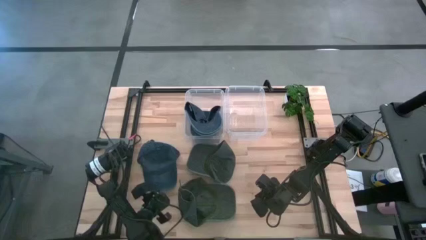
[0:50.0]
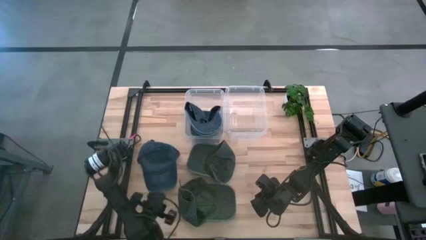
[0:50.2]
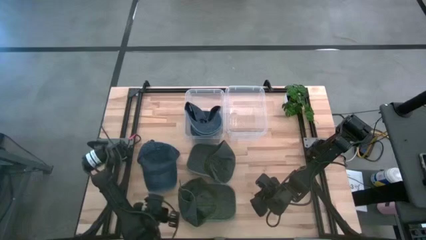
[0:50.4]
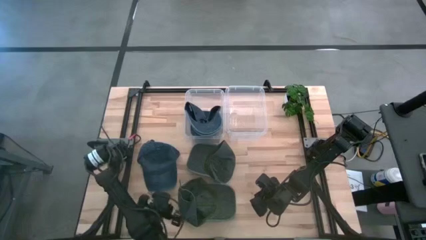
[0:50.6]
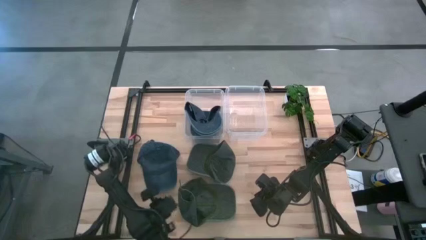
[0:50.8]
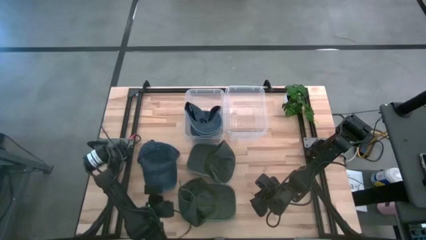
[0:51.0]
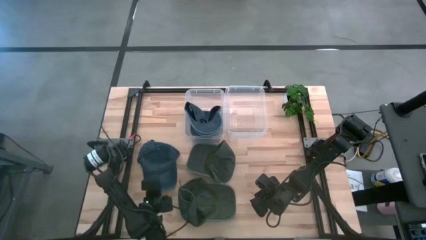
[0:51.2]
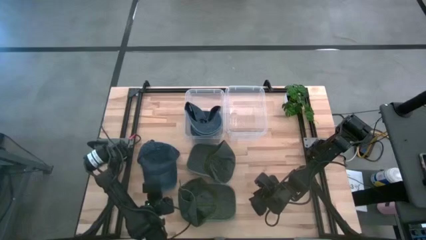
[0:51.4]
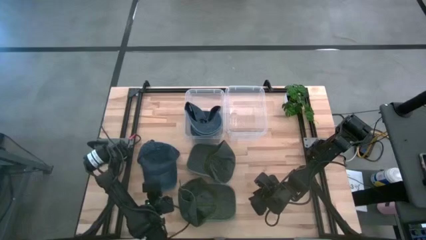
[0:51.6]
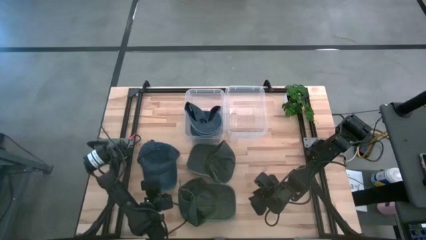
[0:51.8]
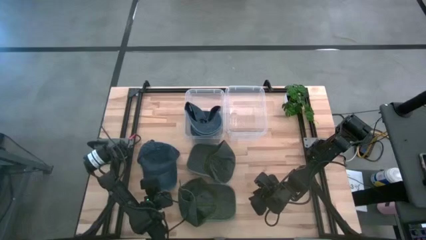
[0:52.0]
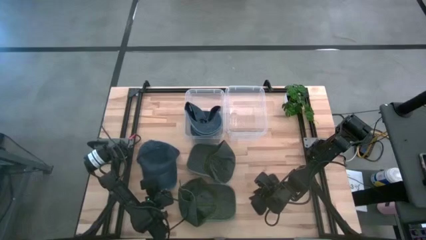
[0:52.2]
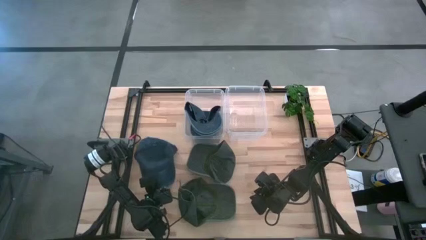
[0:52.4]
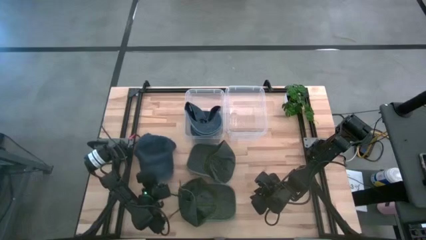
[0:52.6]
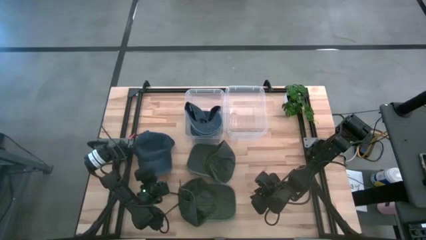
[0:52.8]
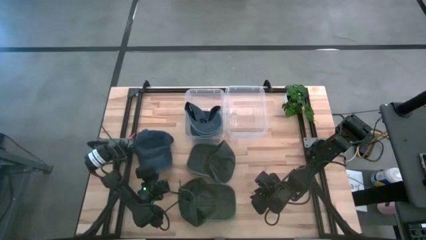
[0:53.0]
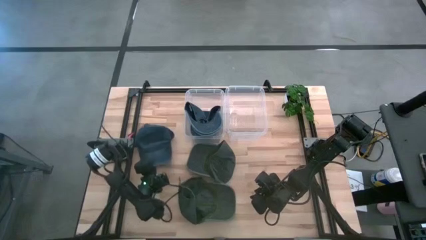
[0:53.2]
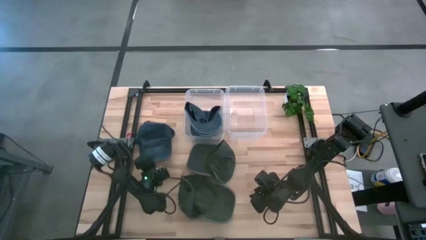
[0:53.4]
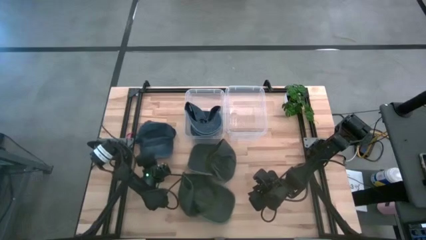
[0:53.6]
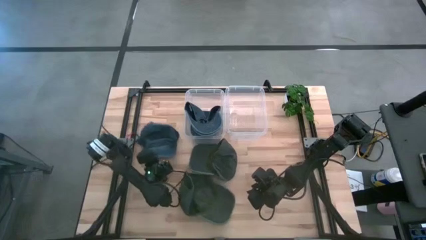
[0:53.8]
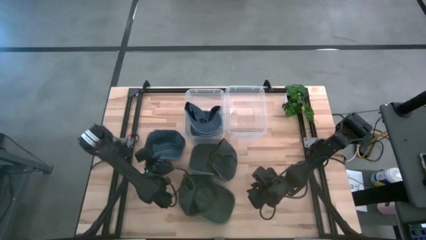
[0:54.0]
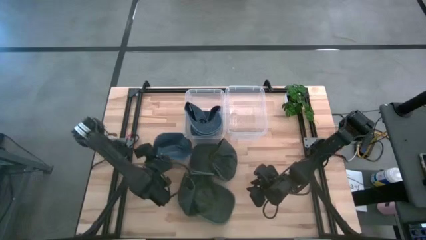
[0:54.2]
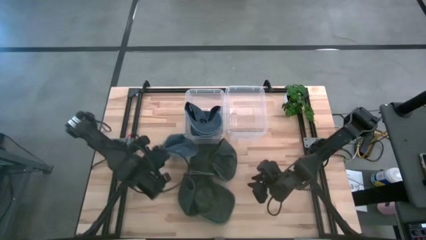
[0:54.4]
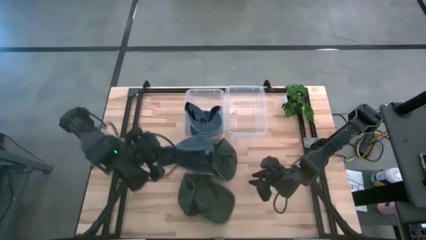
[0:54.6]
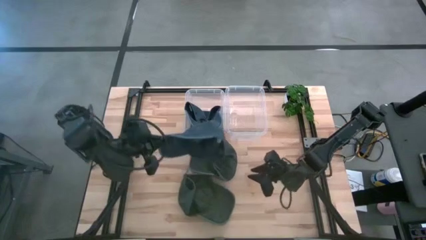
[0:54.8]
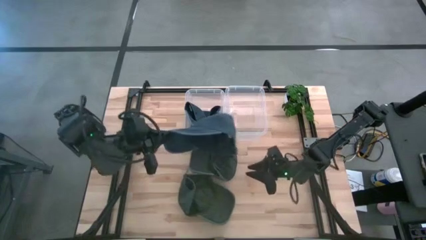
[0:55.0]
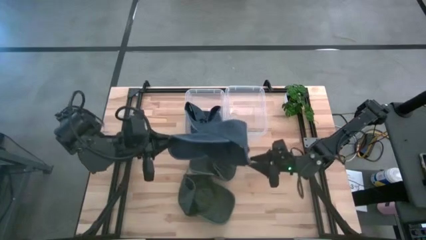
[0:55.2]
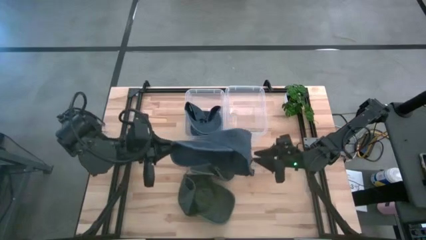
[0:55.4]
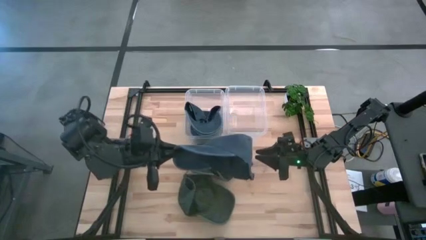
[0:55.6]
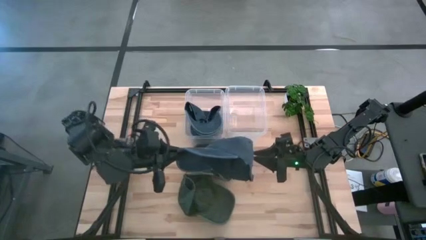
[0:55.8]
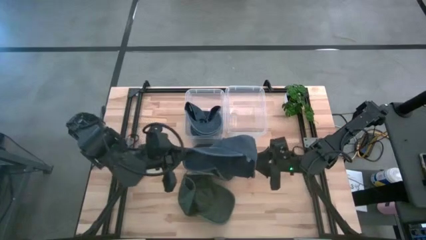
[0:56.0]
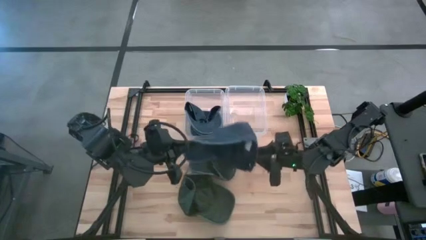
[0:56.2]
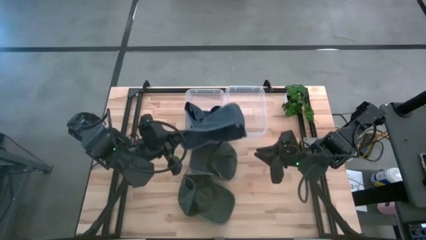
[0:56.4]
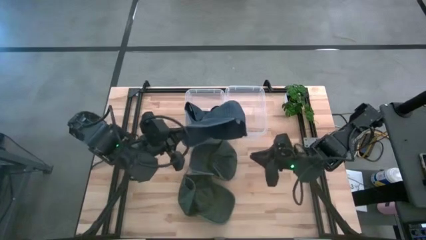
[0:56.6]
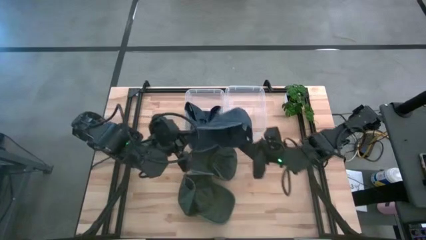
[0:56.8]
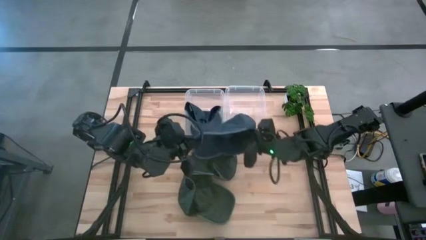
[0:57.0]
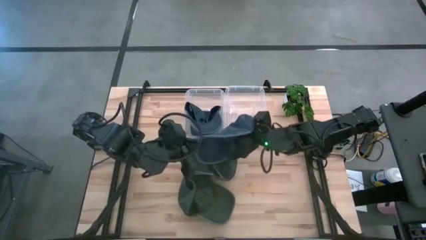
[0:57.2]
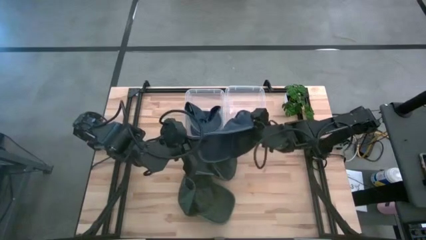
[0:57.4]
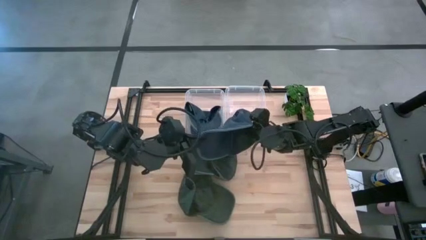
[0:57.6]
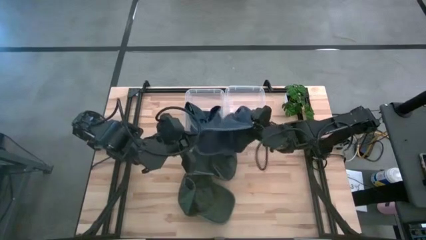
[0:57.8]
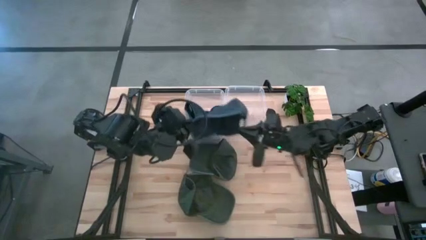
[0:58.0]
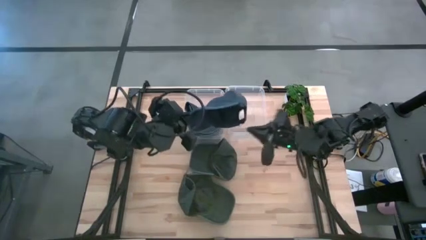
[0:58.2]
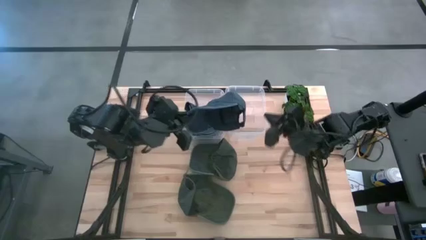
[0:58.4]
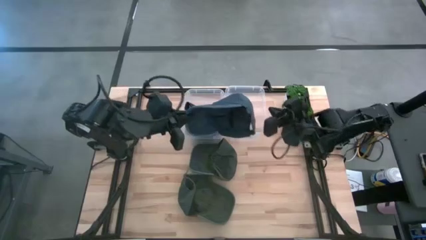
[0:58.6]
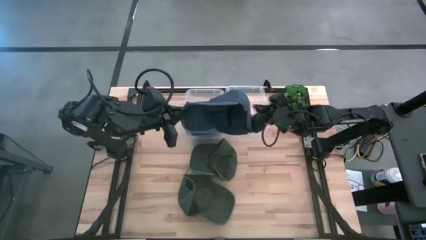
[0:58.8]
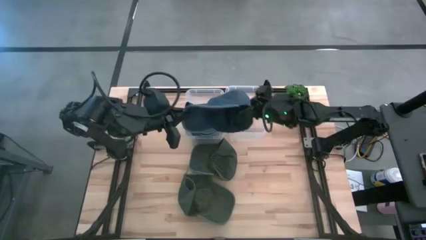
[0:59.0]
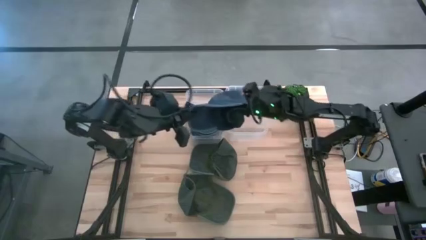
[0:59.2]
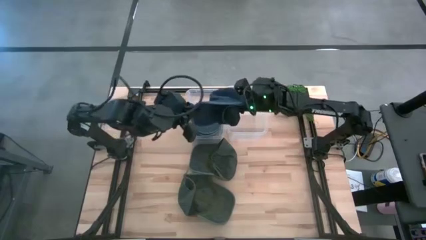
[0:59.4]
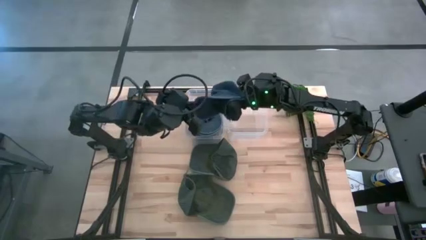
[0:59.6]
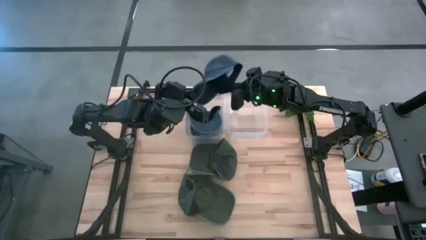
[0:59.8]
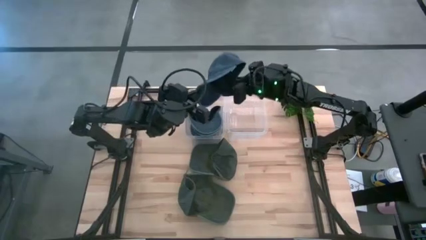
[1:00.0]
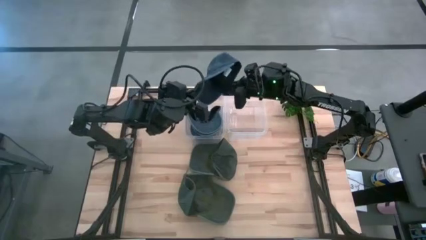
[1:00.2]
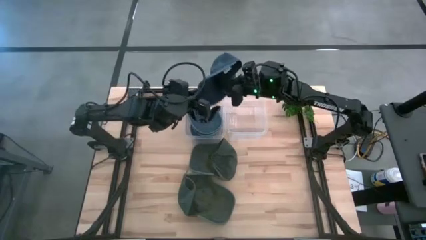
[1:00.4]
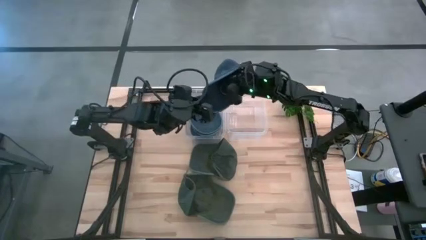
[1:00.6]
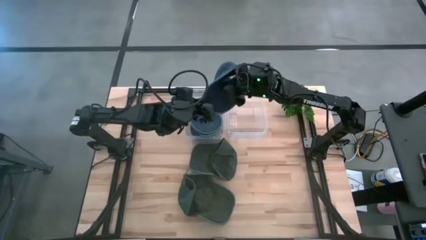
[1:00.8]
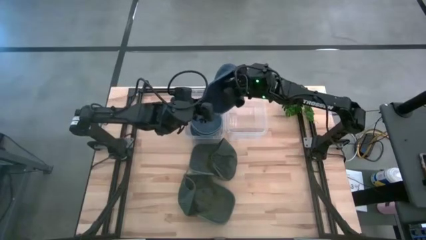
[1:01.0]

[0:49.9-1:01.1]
Task: Pick & Place hat
Put the blue cap into the left transparent bin

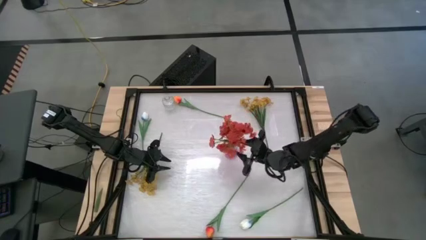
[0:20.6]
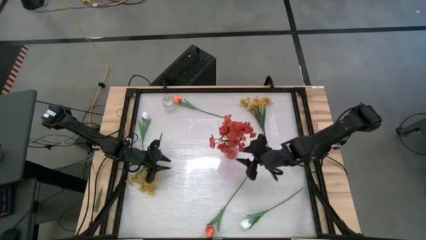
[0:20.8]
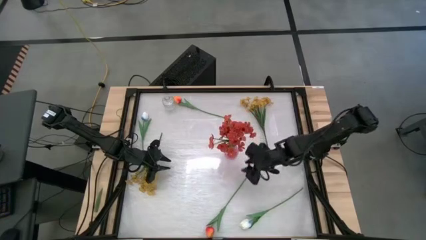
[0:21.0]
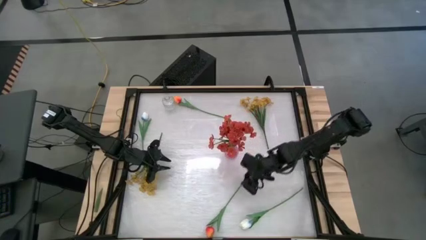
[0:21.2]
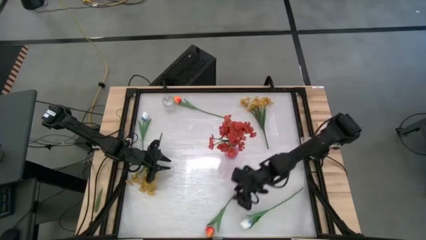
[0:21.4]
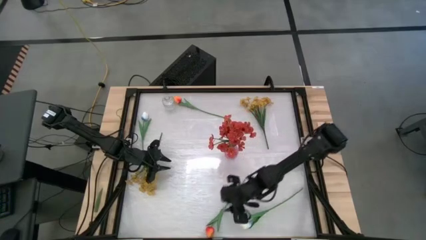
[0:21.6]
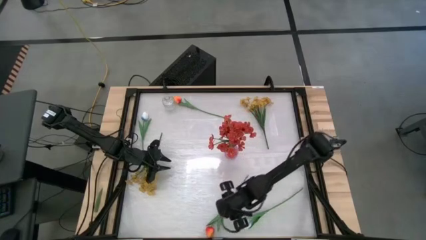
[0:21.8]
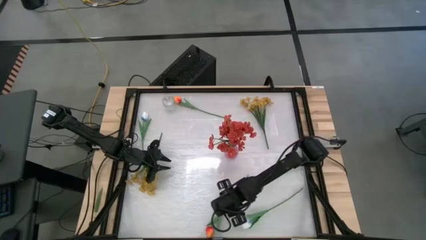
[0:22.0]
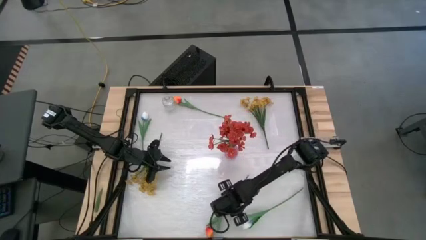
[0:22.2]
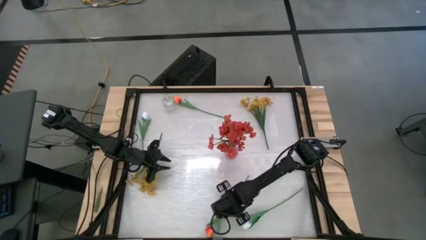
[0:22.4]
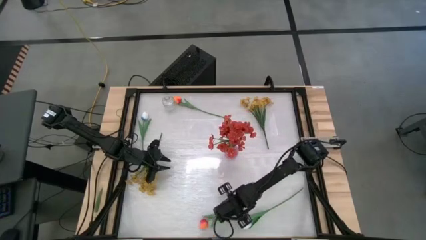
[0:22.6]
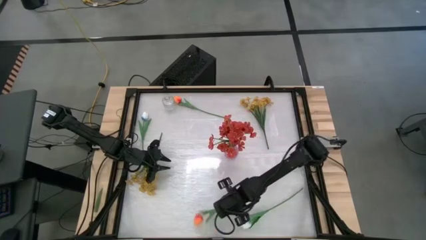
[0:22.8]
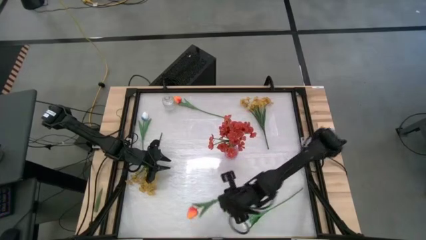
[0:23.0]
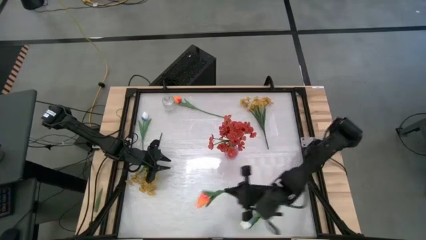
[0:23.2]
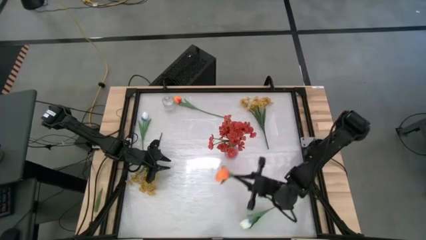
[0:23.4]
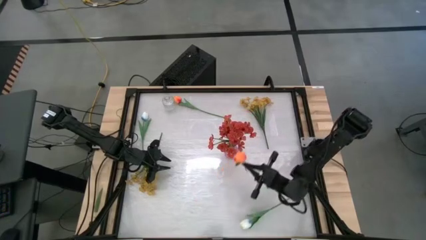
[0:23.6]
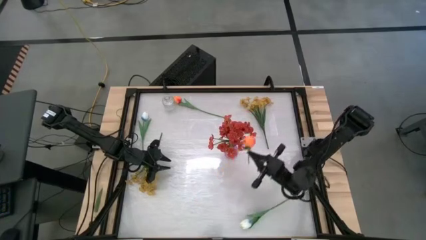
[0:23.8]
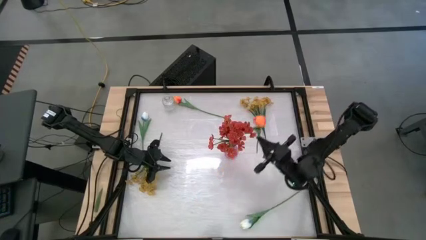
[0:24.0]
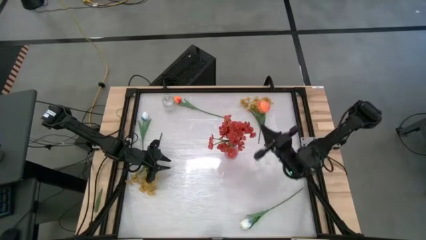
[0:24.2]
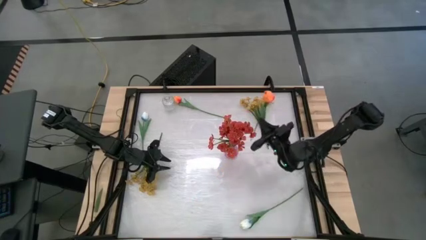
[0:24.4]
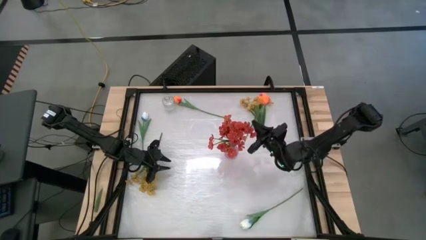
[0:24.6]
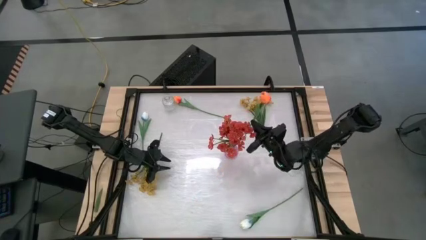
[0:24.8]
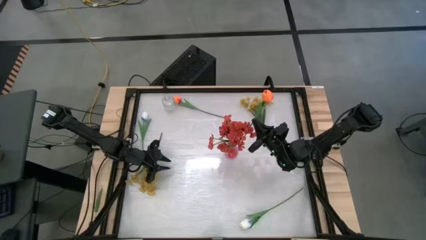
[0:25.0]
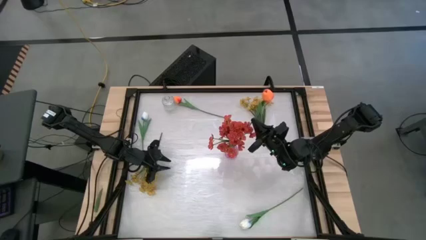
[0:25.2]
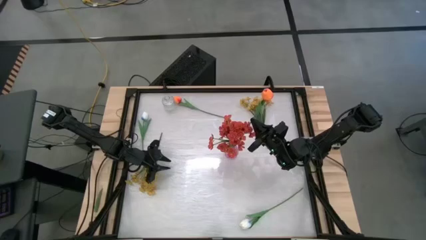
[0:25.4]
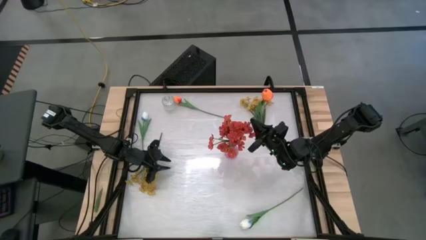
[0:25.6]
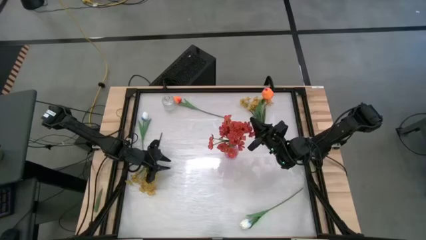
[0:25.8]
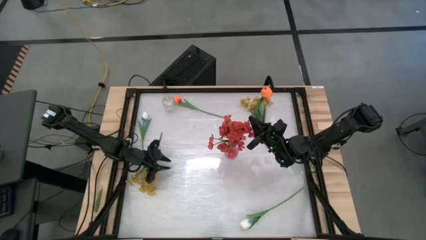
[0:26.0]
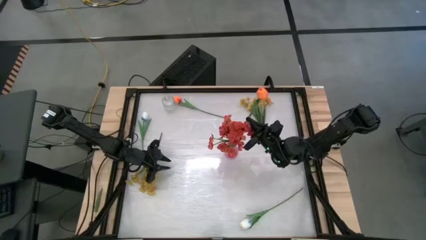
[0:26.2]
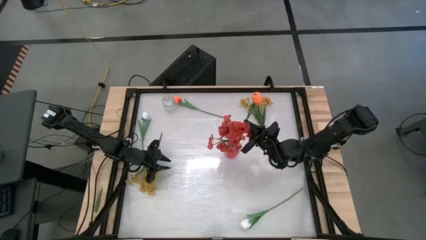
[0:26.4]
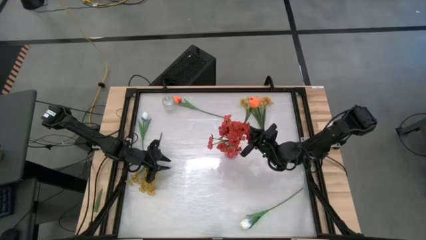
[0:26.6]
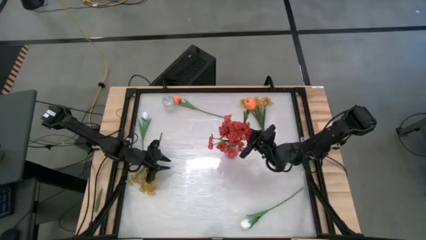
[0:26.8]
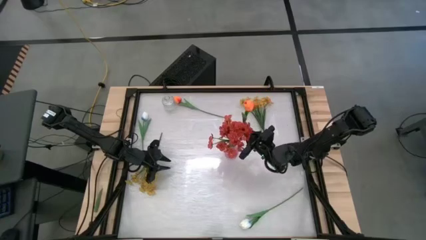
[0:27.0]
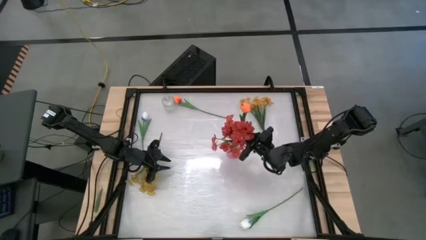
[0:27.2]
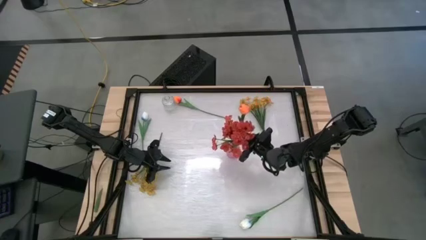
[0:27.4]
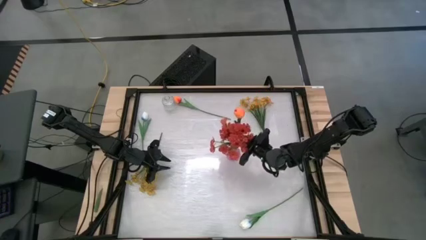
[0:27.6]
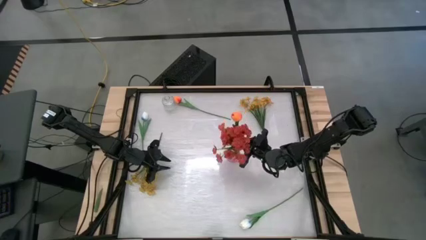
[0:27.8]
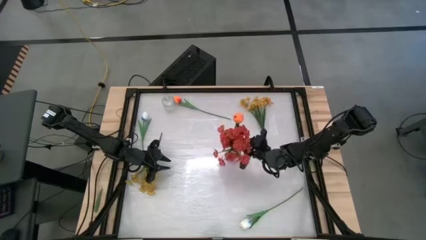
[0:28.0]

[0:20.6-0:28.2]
Task: Sort flowers into vase by color
Put the bottom orange flower into the violet vase
